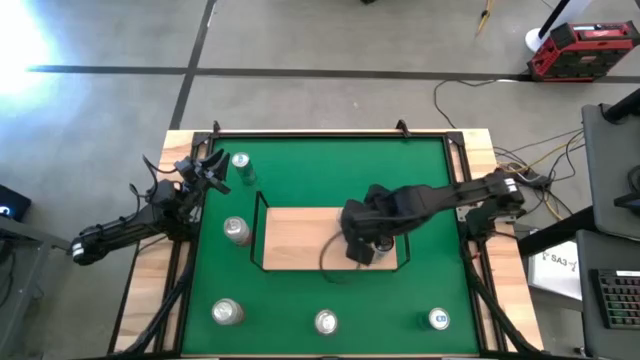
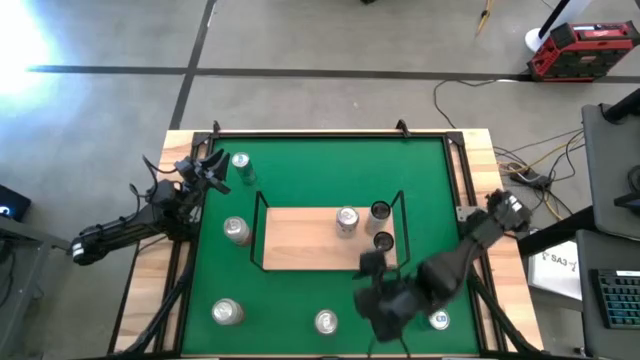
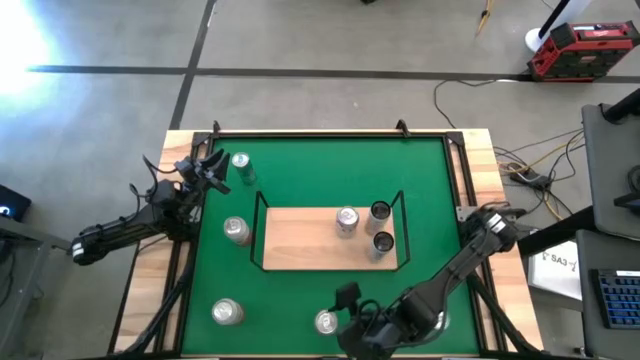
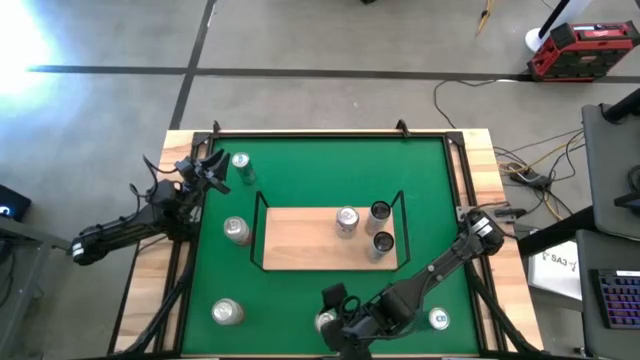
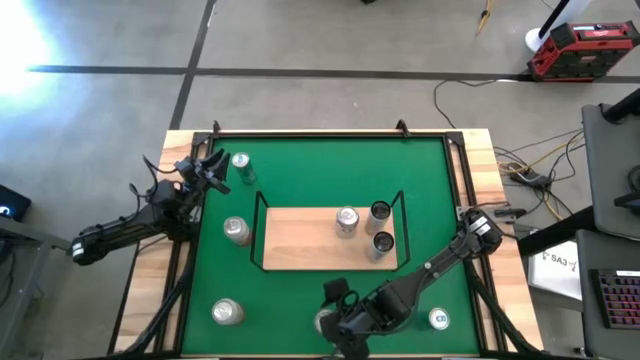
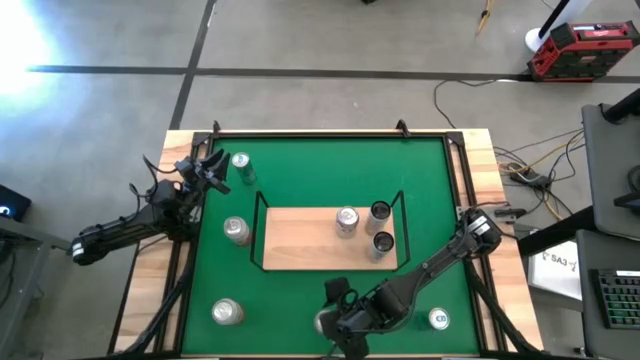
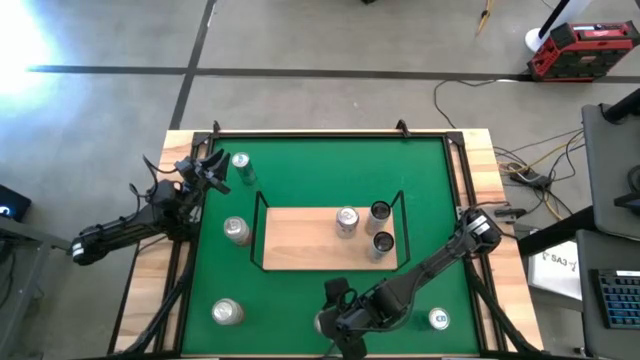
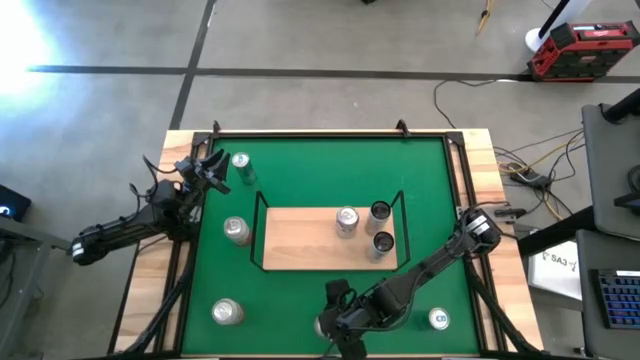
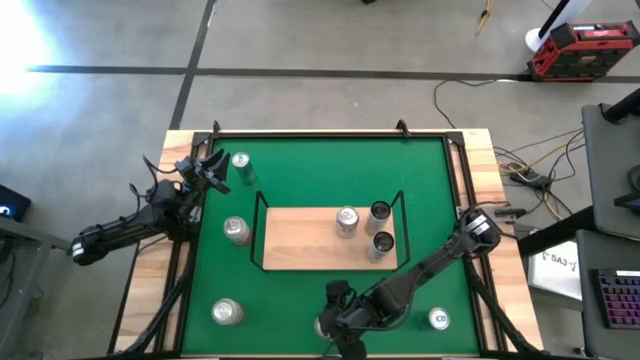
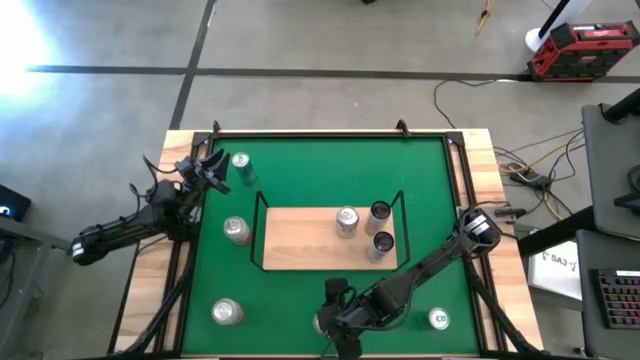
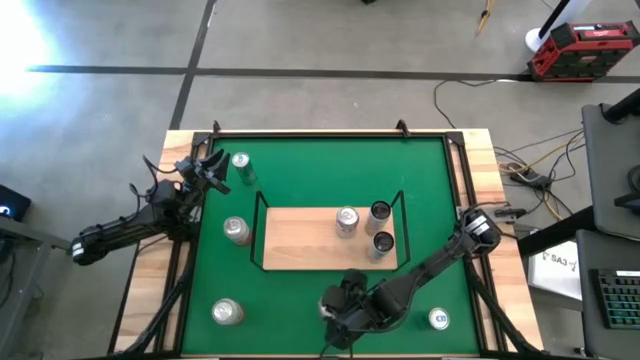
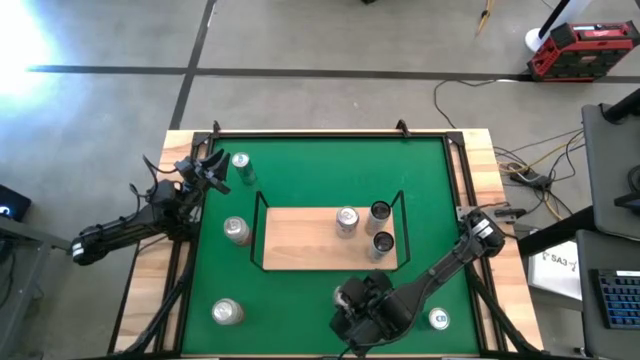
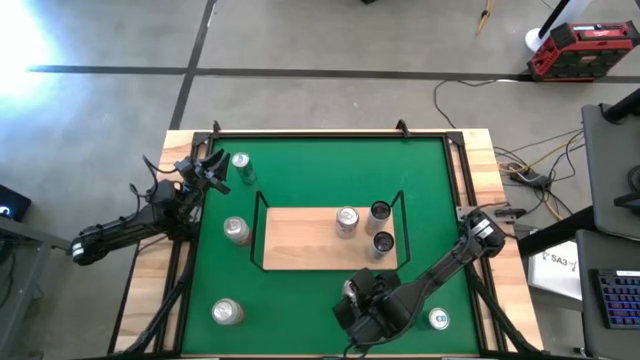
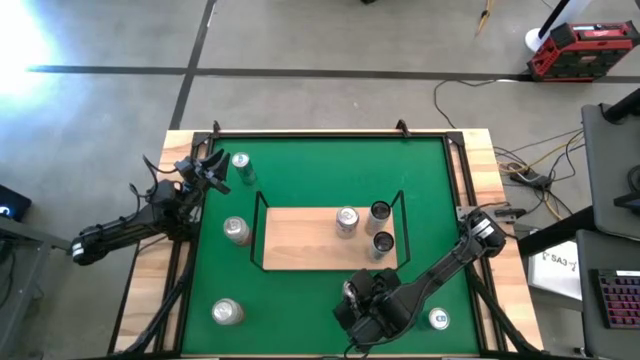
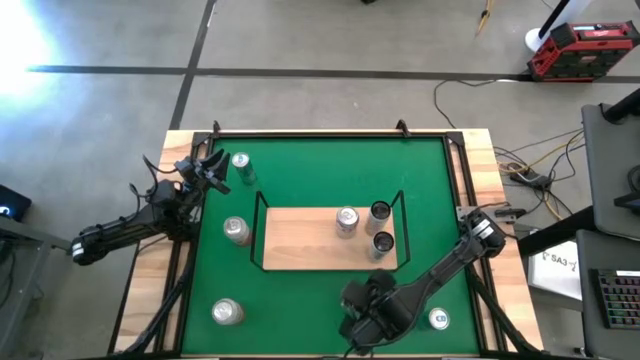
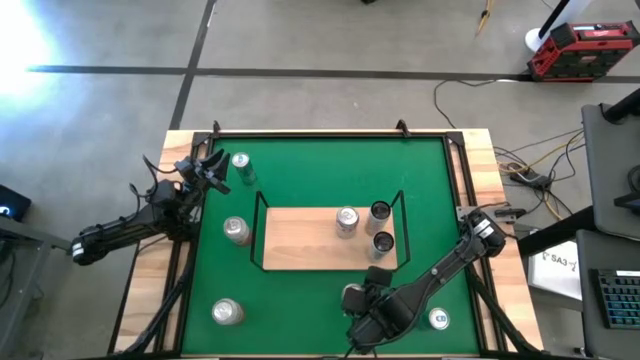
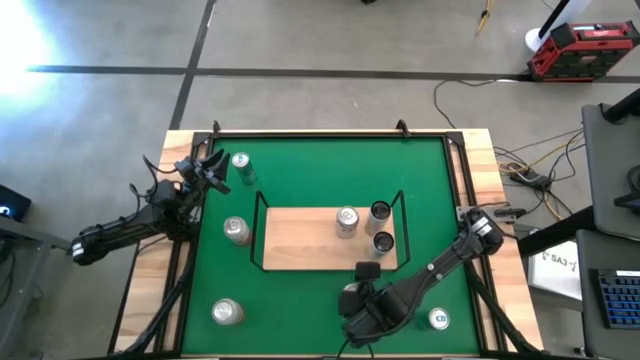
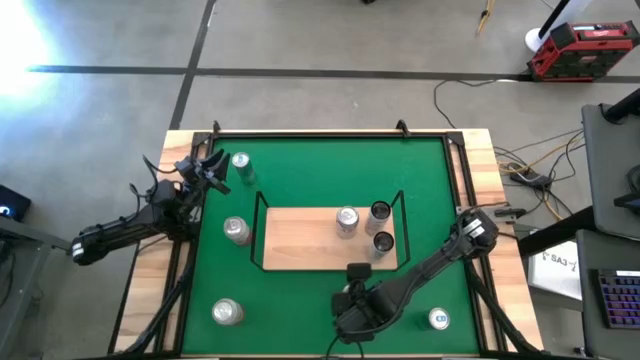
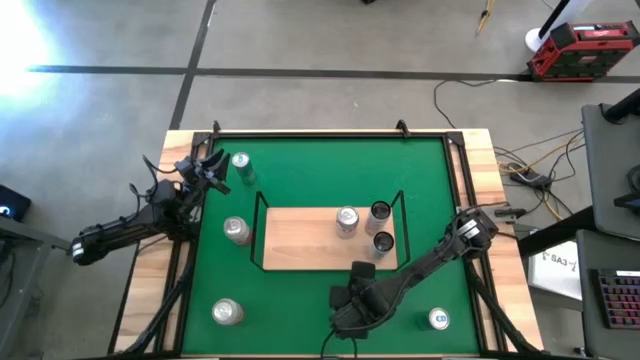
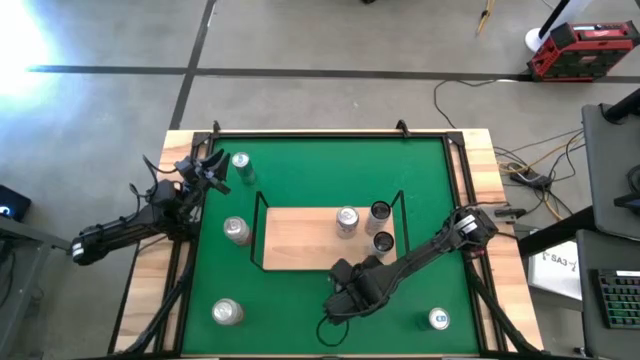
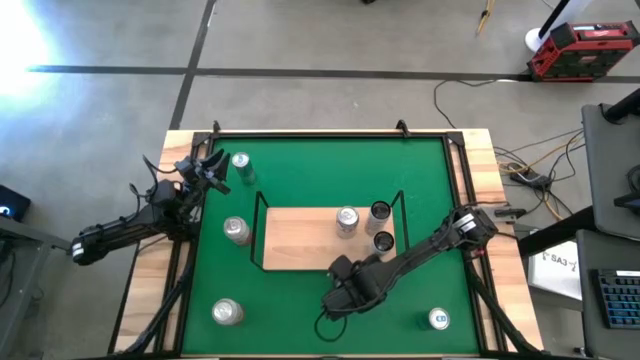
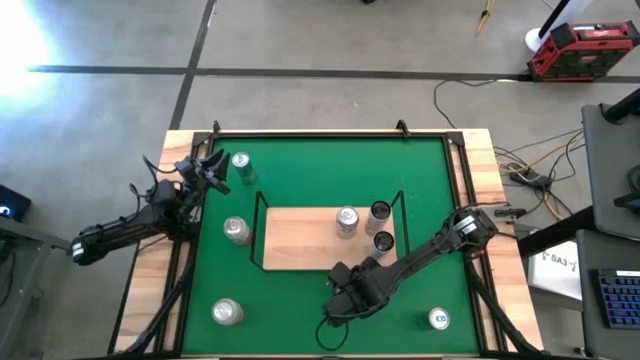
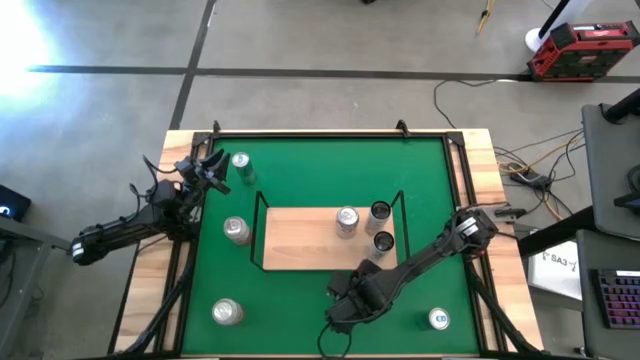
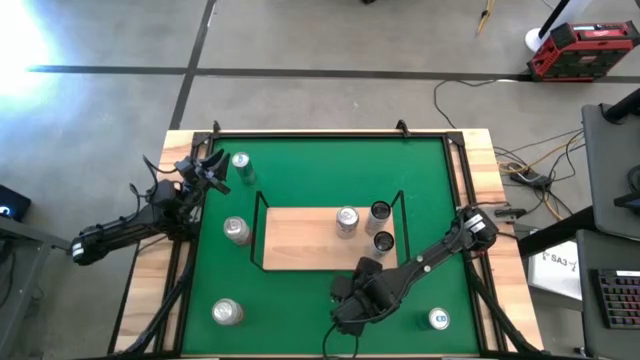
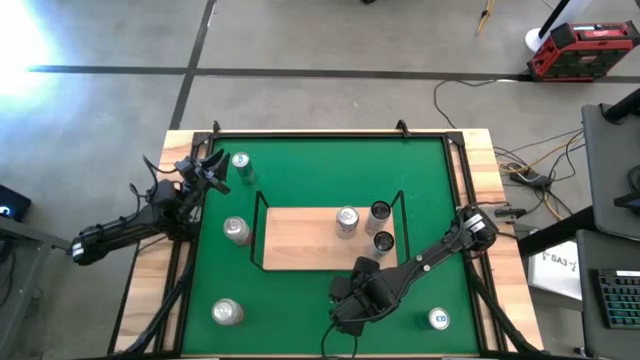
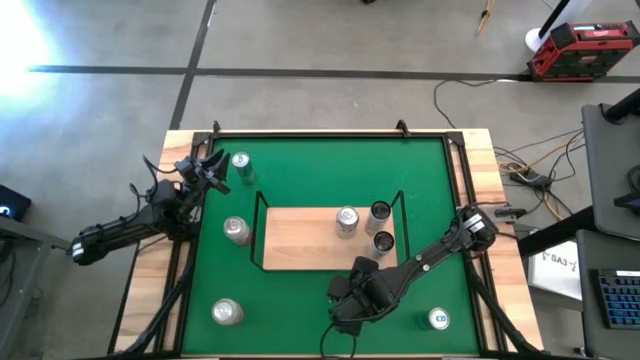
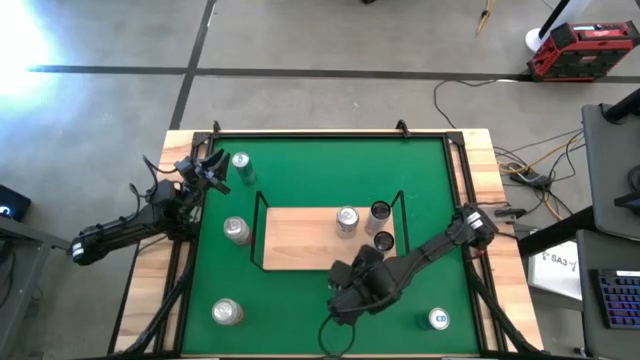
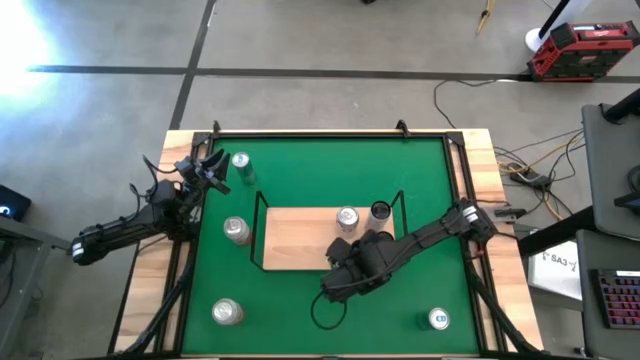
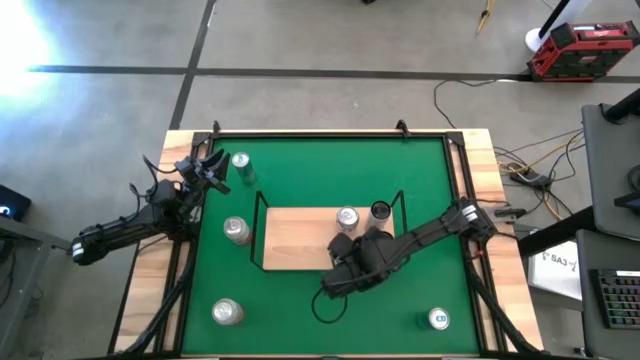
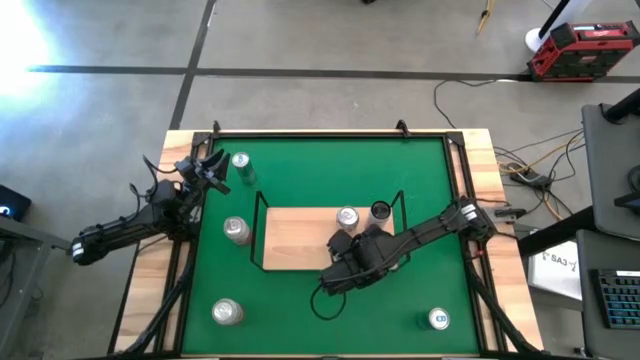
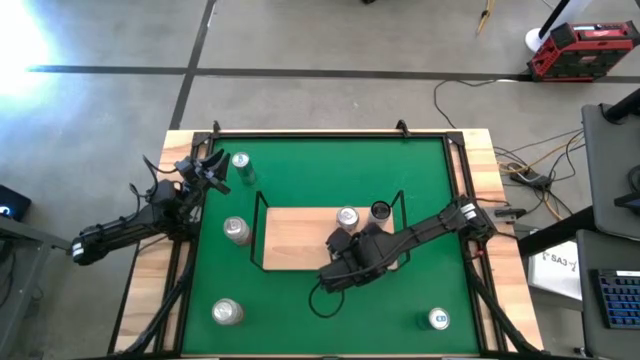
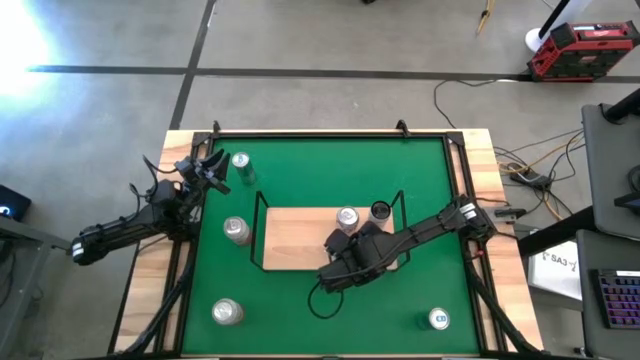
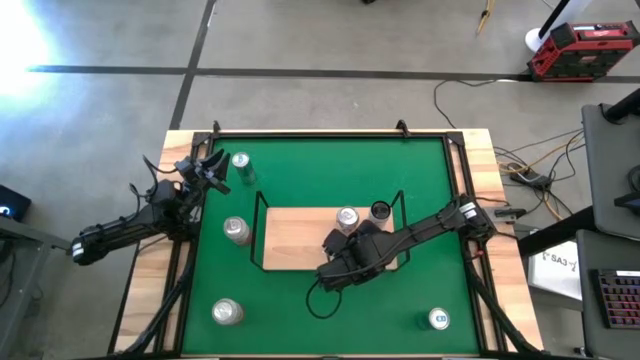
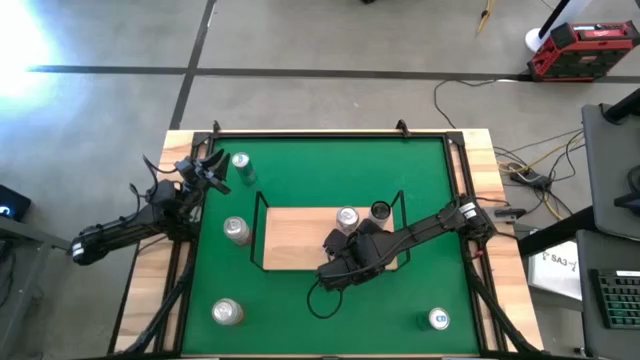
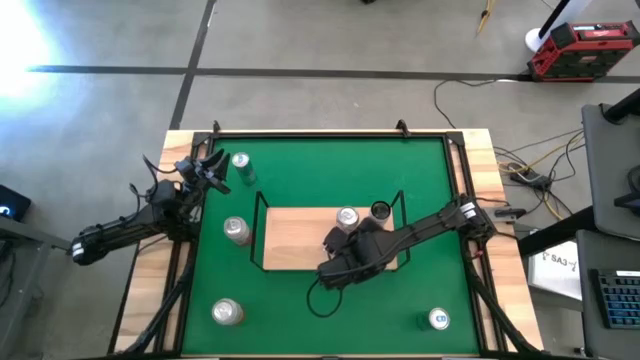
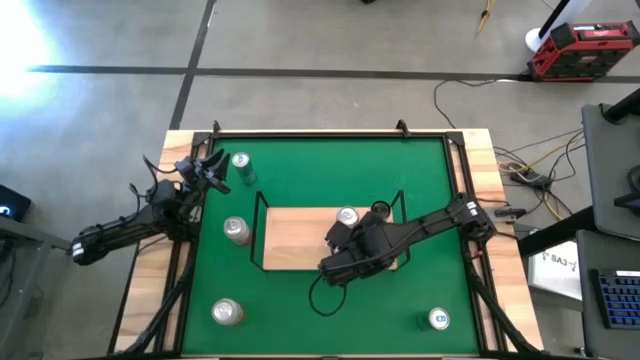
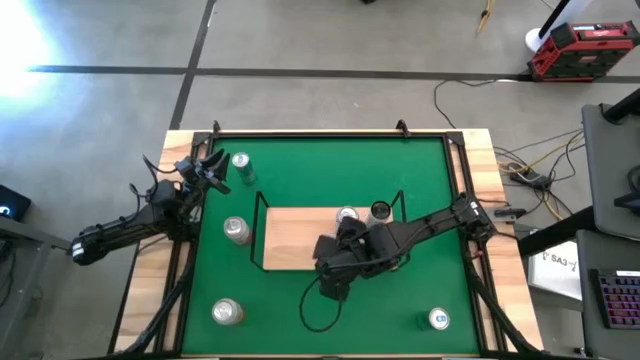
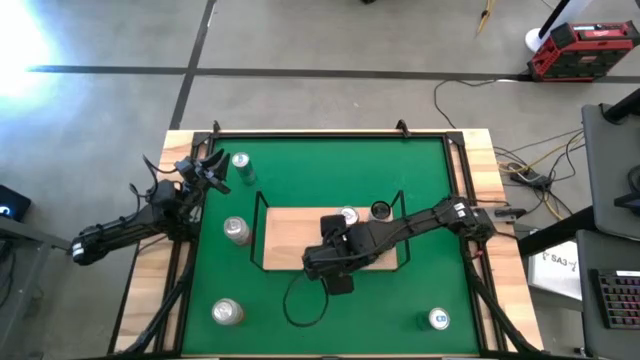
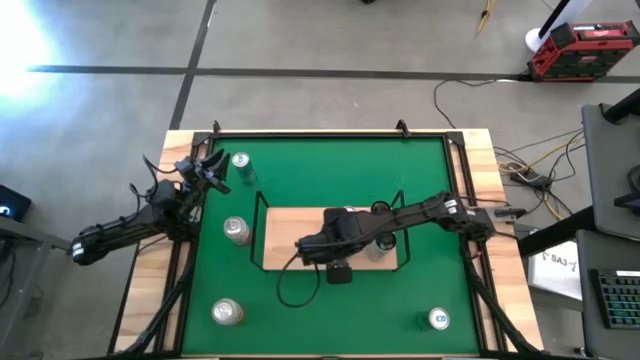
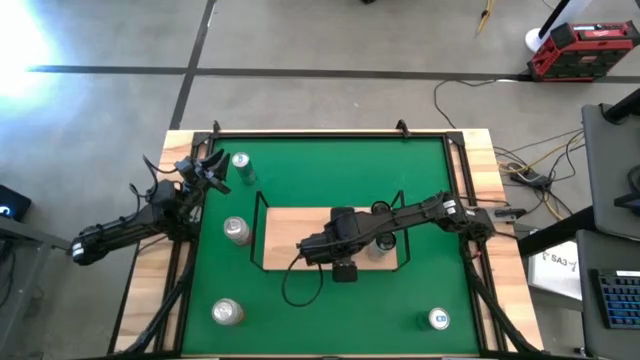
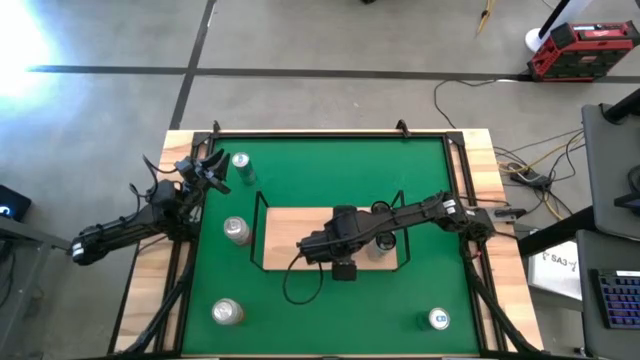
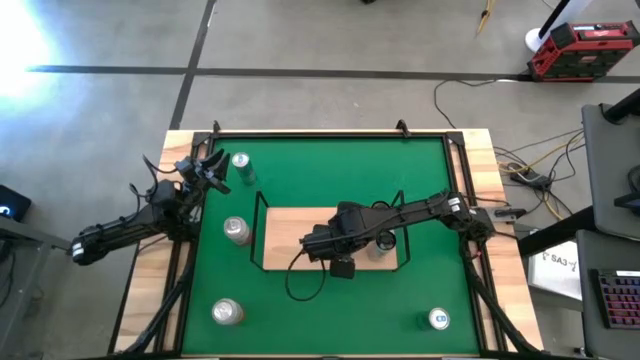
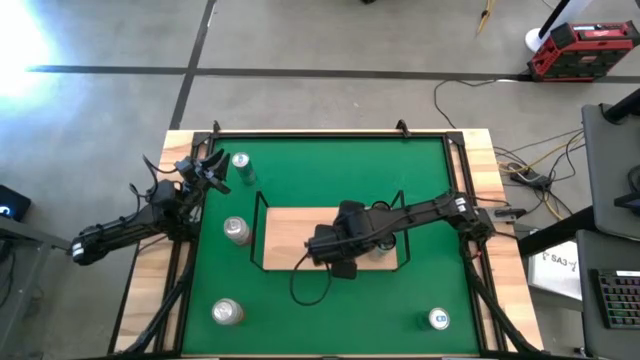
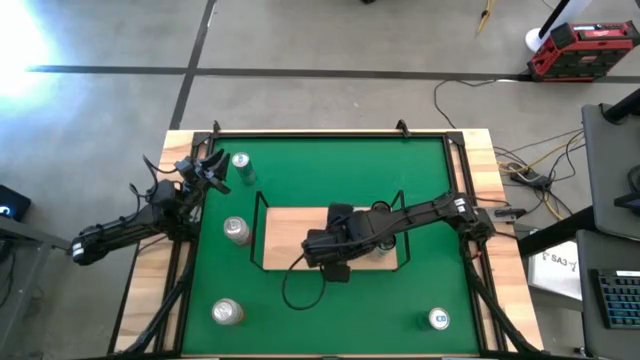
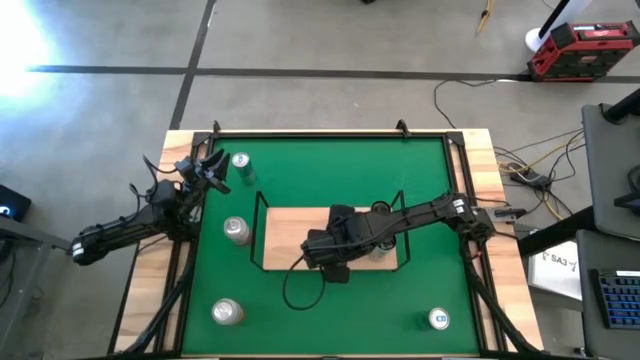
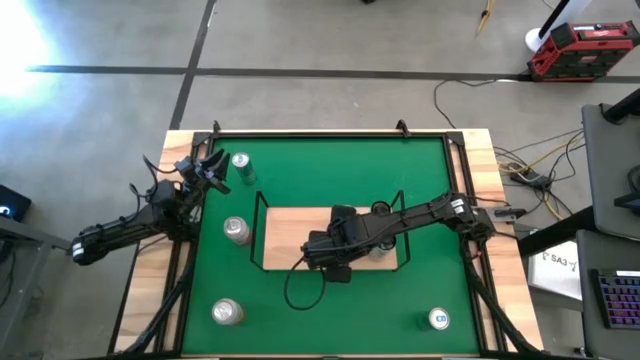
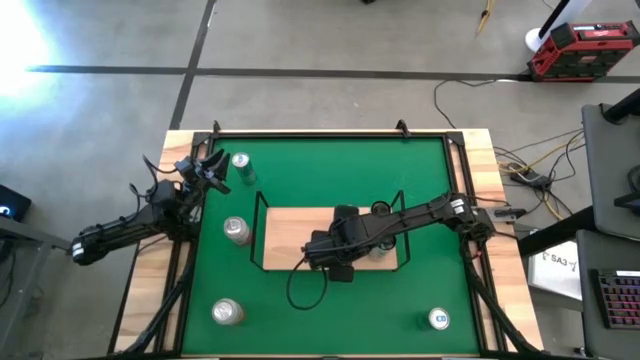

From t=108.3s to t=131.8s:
Task: Place canned beverage on shelf
Put the red and silver soda can on the shelf and align with the other red and silver soda can
